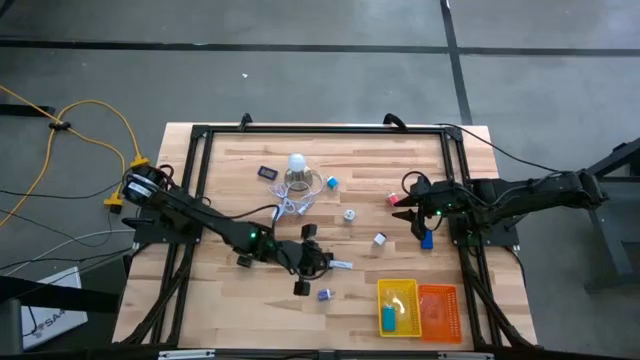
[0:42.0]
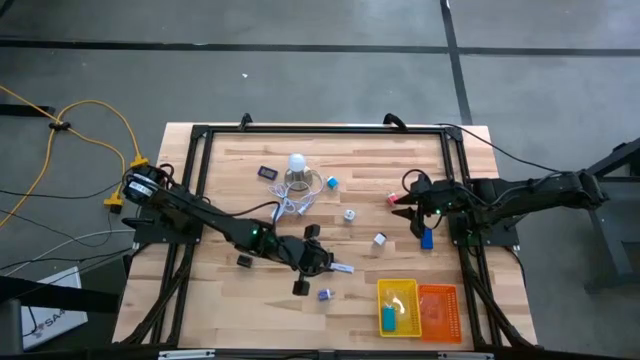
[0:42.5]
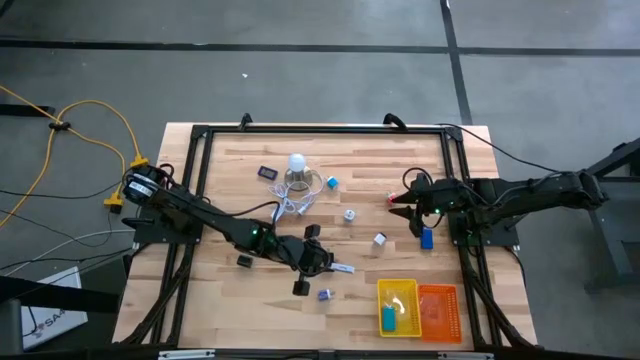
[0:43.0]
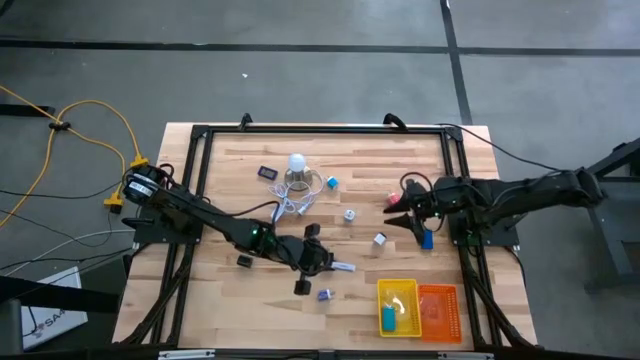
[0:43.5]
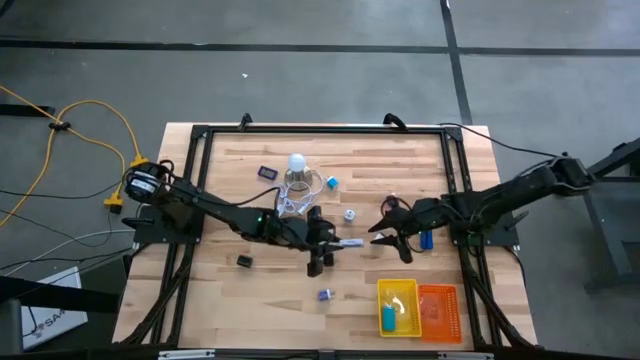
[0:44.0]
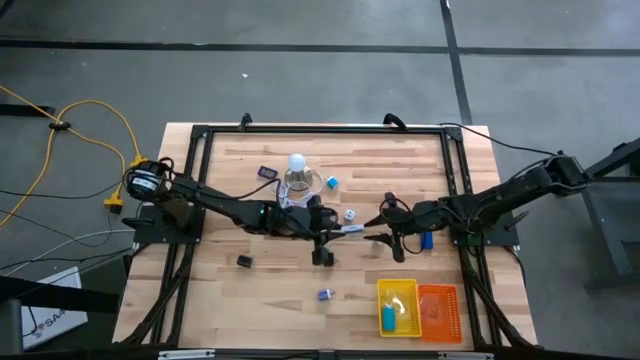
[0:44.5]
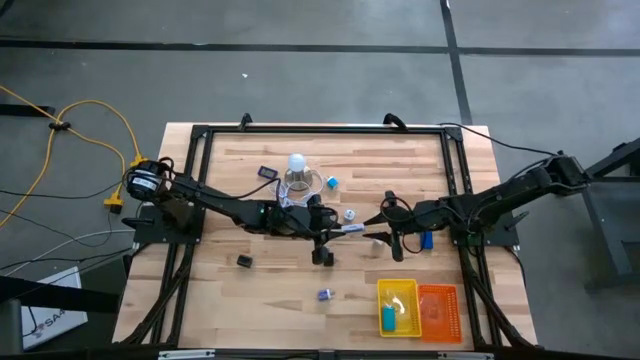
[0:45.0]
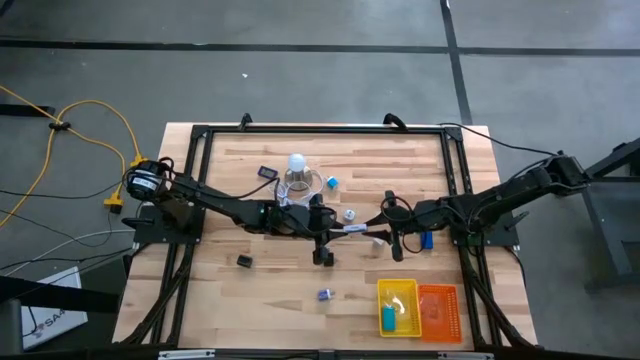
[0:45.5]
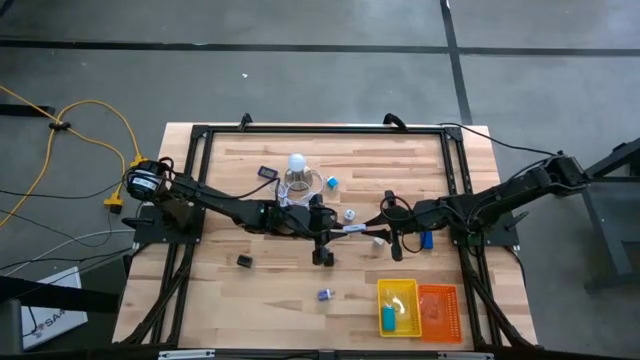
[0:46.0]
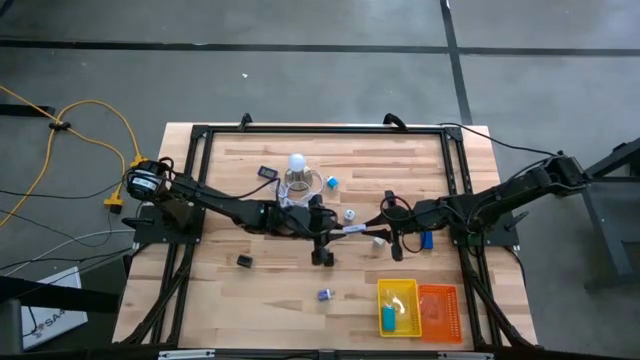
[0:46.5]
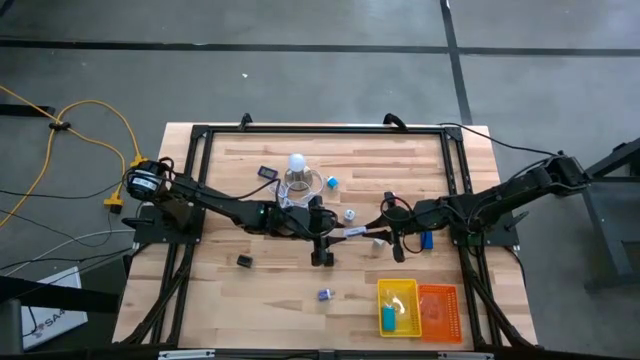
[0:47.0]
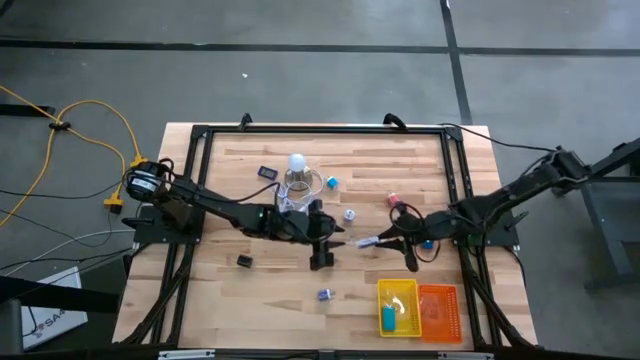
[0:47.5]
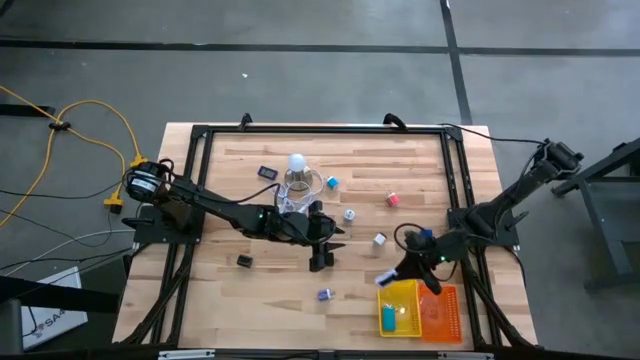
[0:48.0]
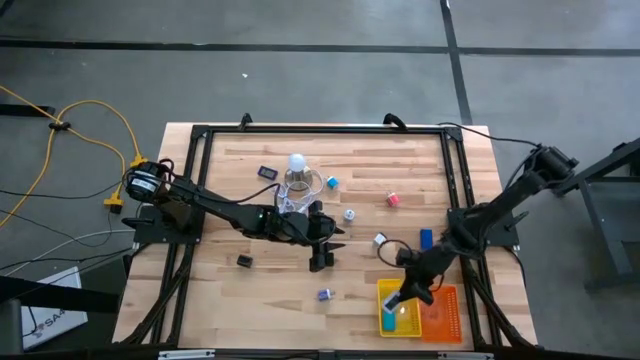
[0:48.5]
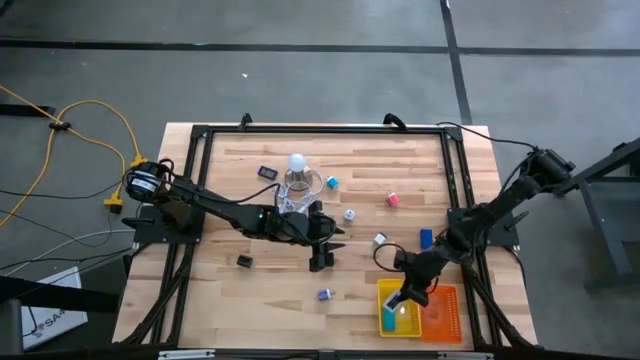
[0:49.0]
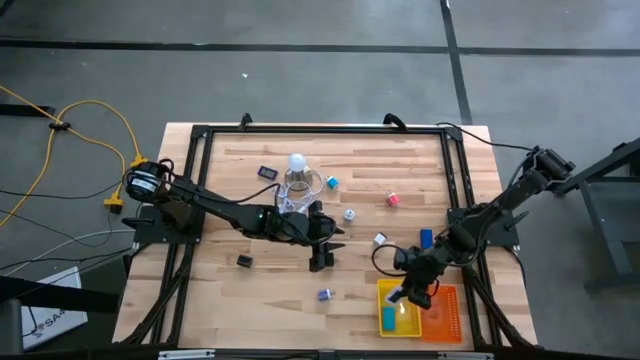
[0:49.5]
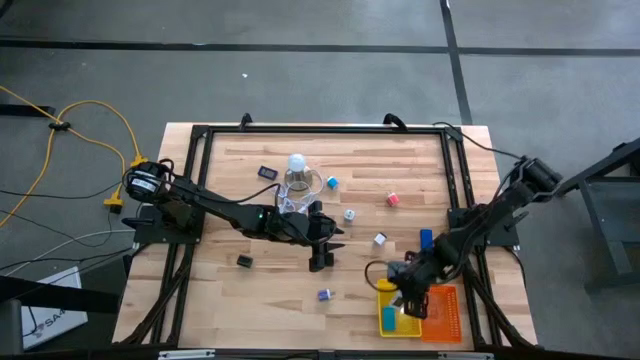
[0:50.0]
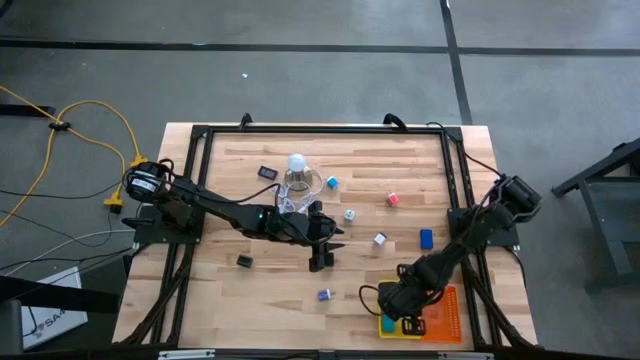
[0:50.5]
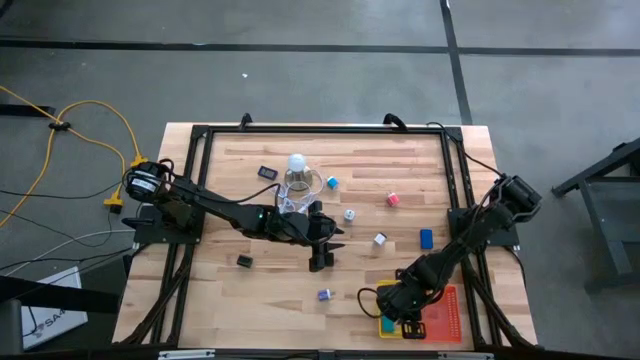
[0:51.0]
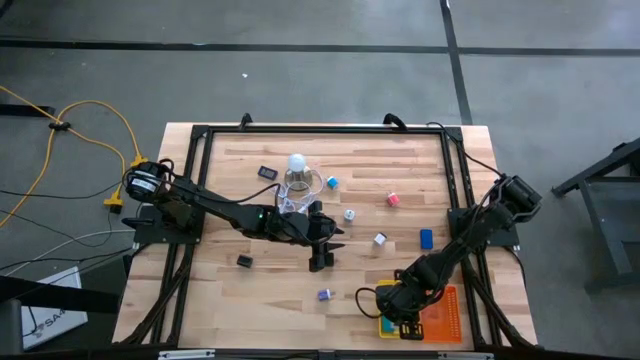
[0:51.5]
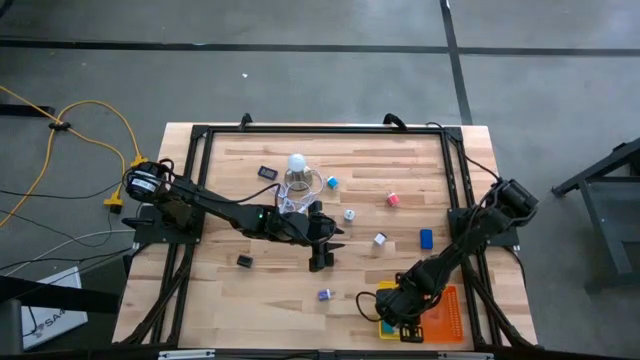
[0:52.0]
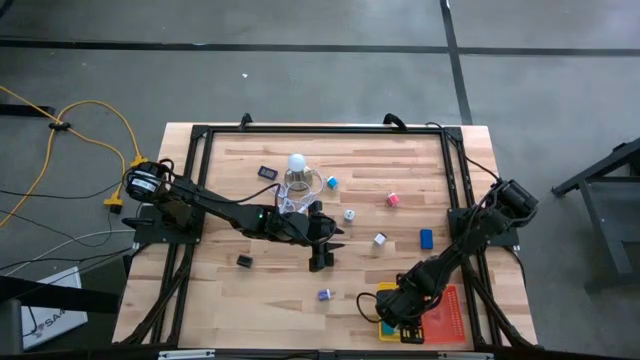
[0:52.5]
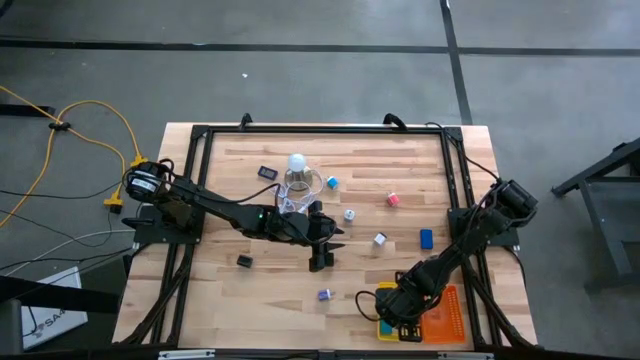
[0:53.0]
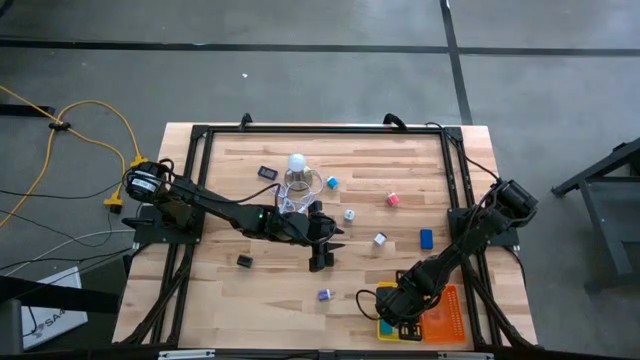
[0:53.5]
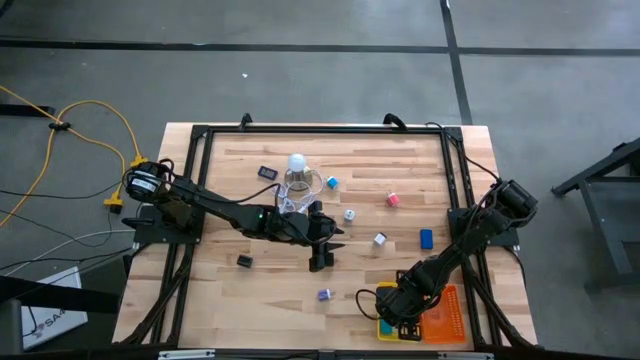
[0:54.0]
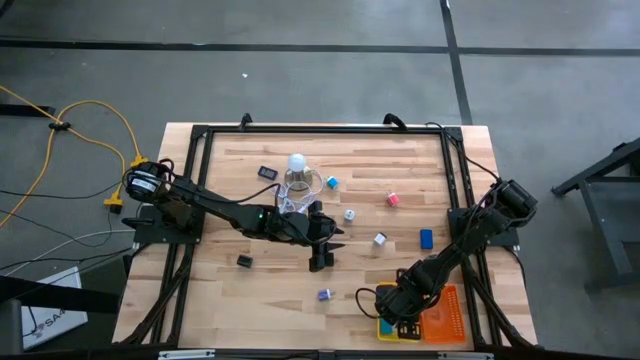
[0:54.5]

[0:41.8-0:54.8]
Task: Pick & Place Office items
Put the white digital clock into the yellow basket
